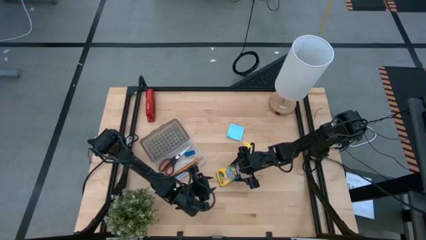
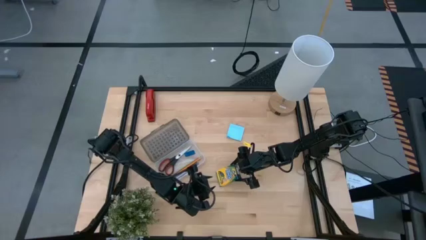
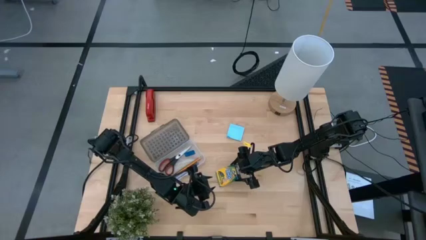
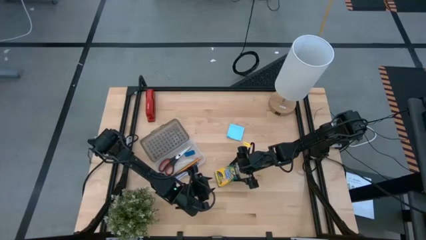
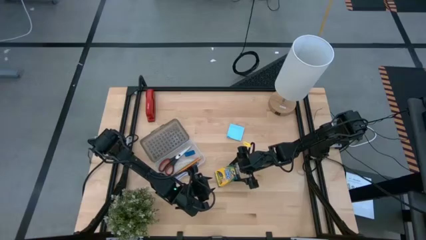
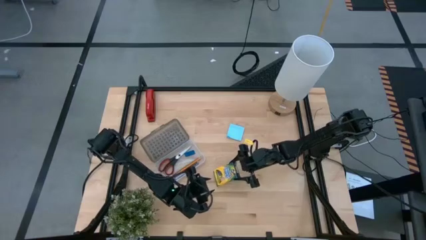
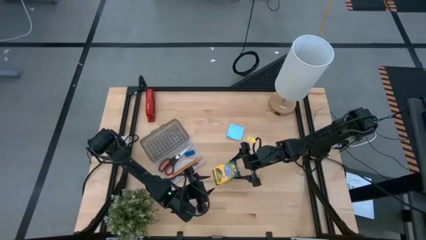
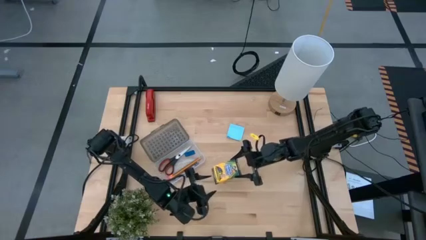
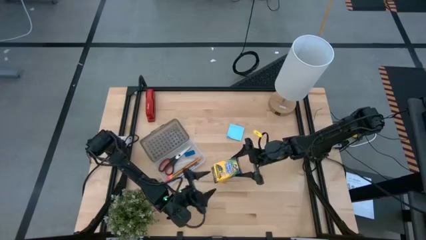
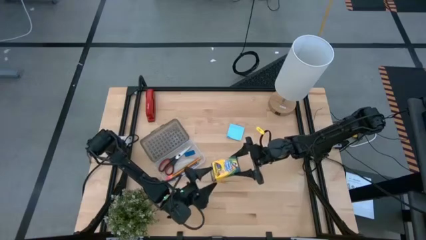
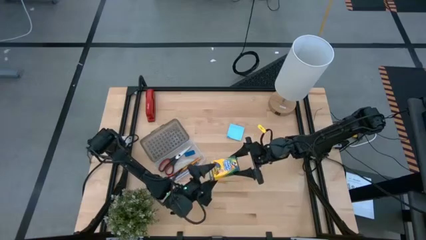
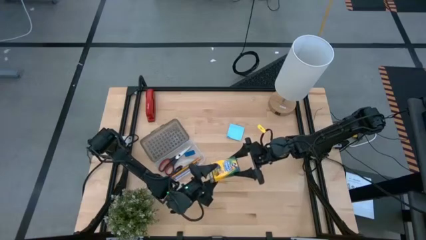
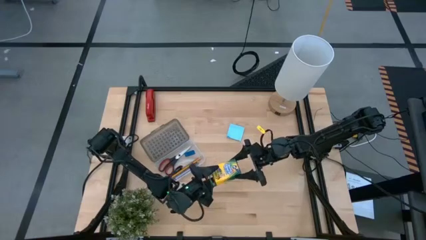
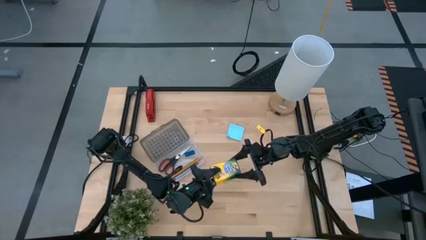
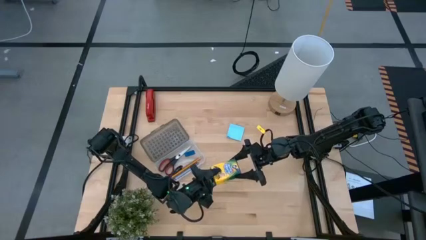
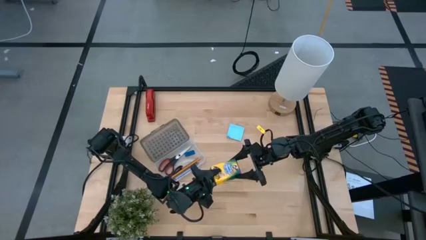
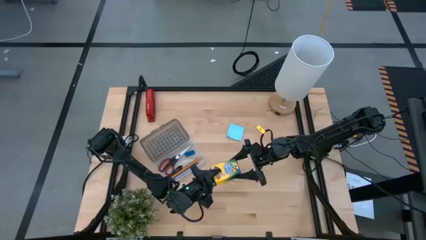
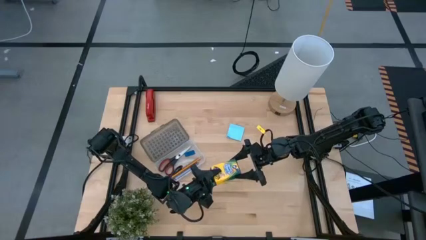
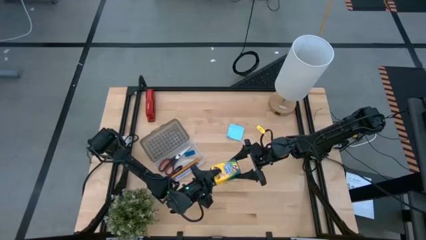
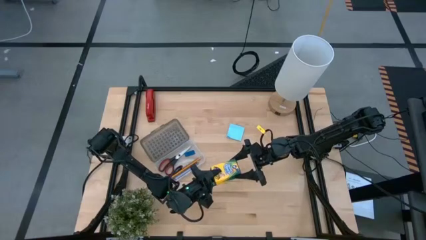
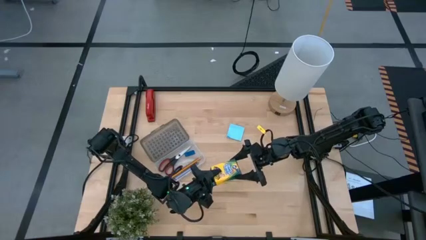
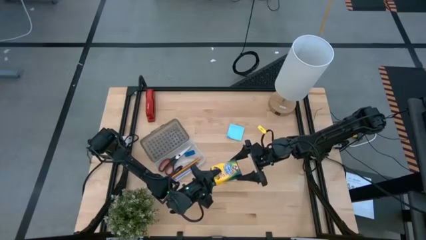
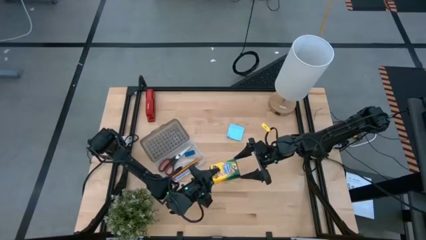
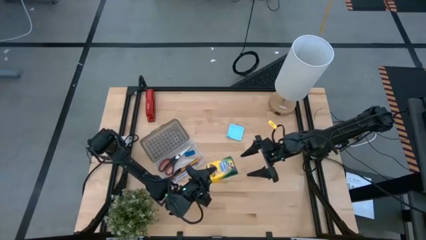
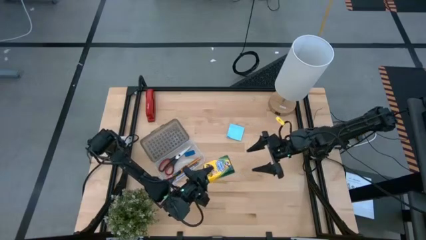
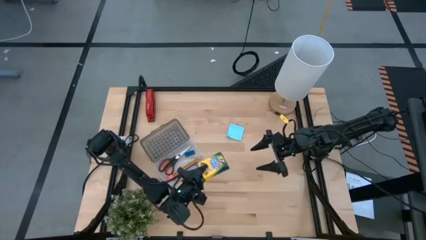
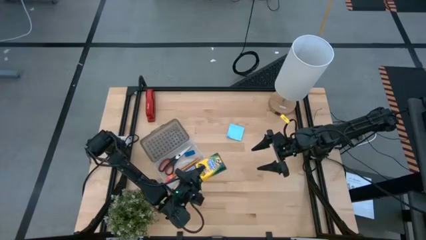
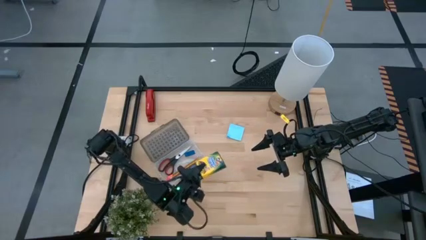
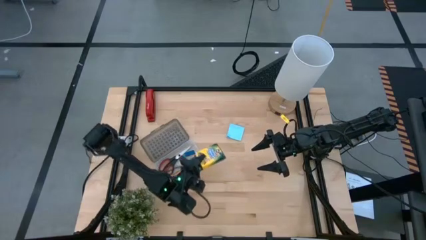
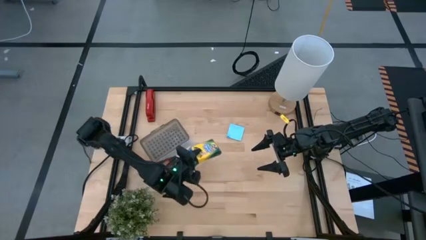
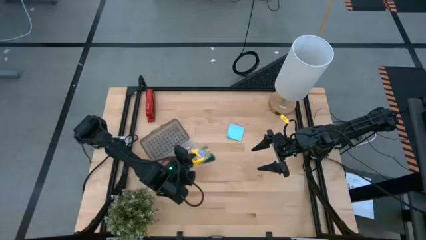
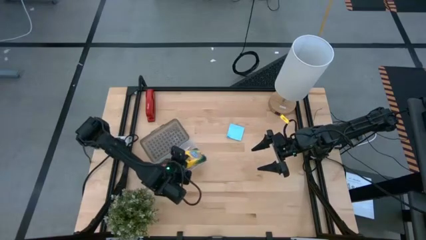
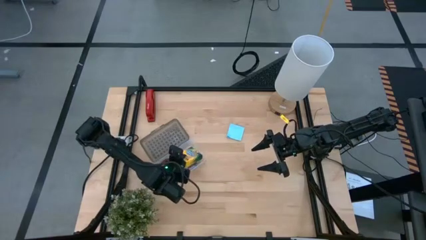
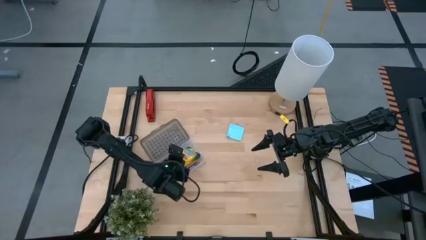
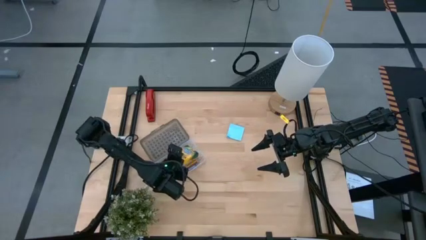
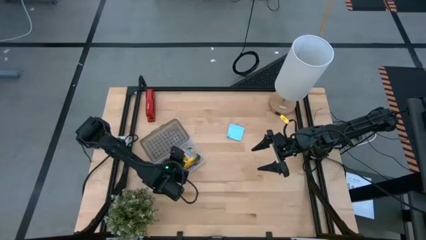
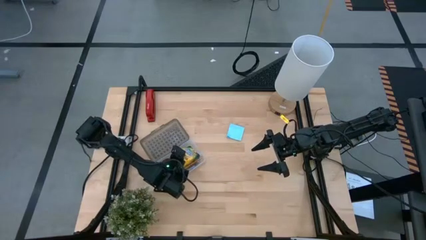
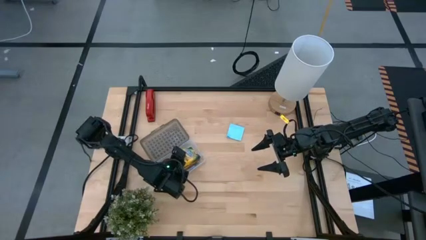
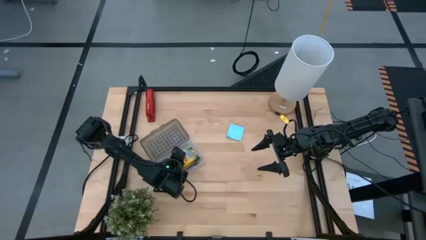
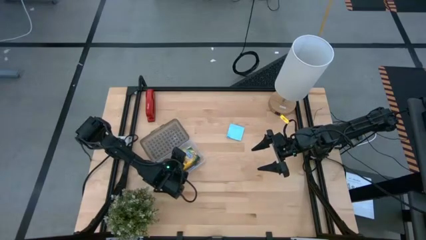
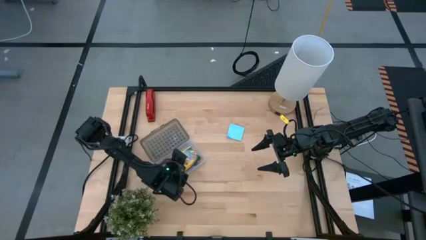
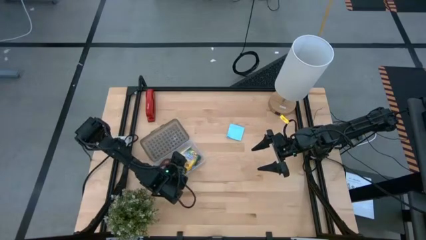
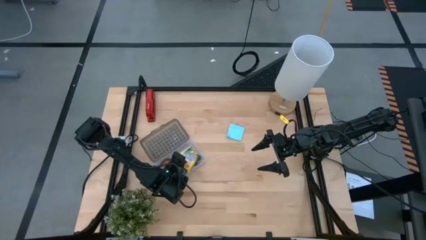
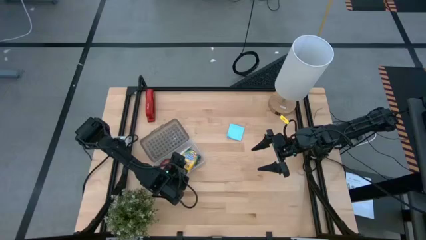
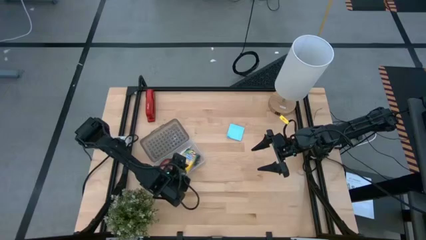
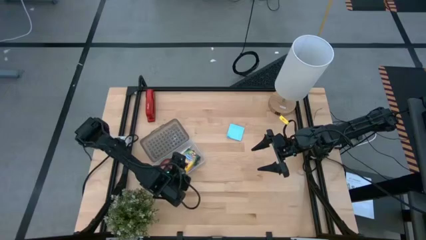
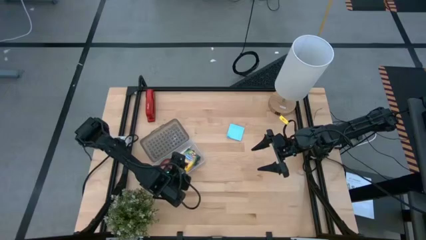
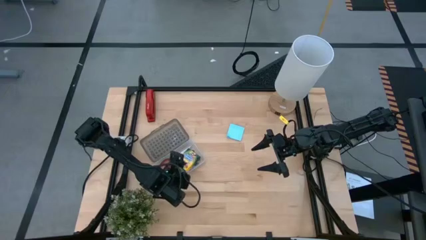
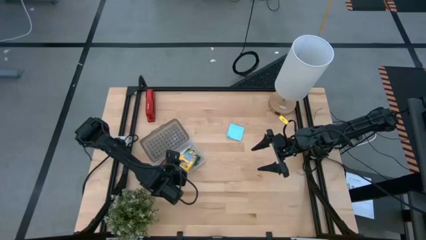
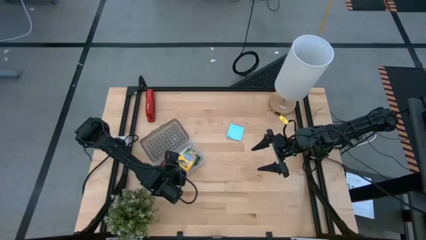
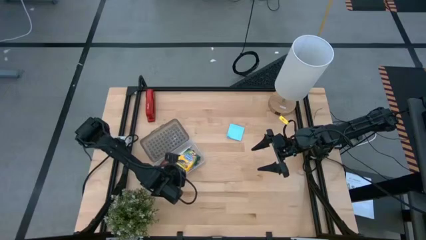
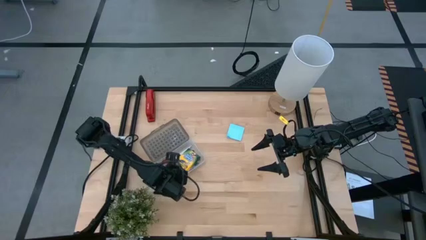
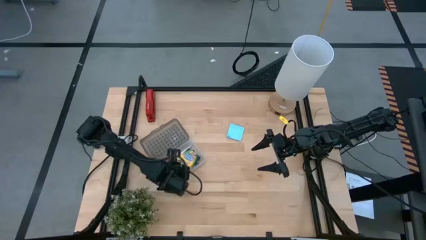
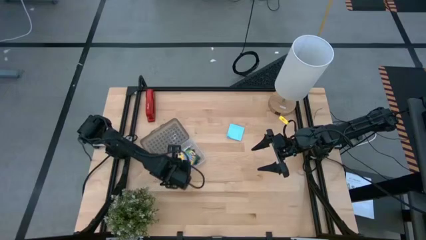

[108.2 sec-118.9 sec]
Task: Pack school essentials
Put the yellow crayon box into the supply box

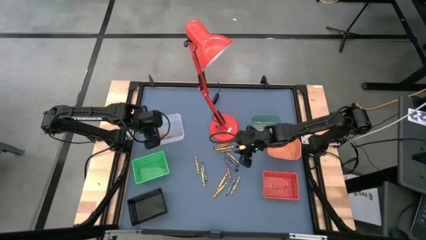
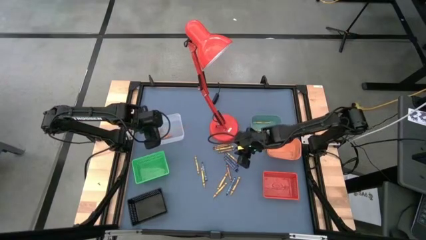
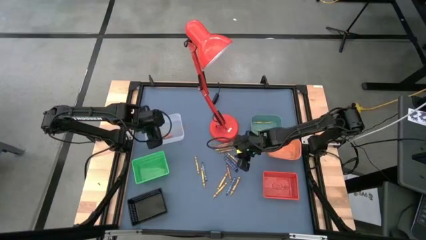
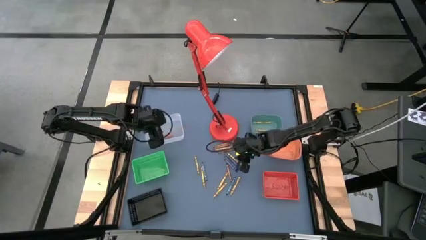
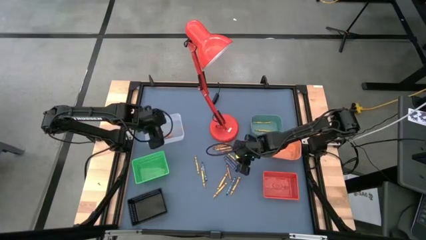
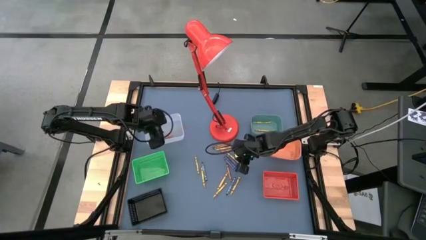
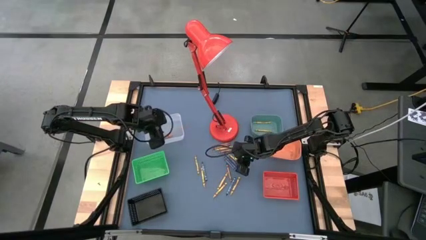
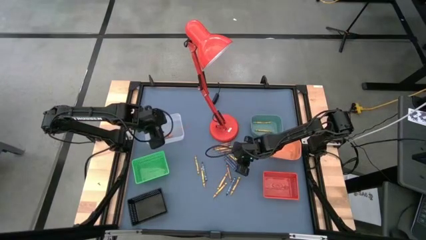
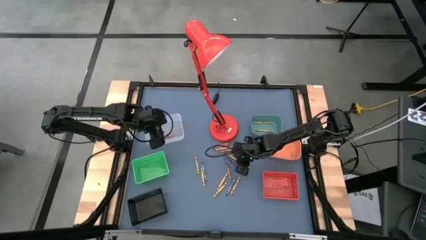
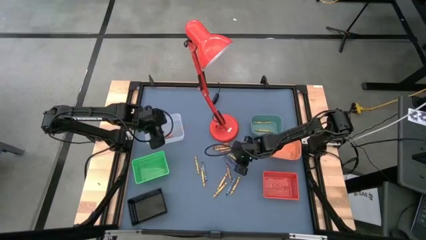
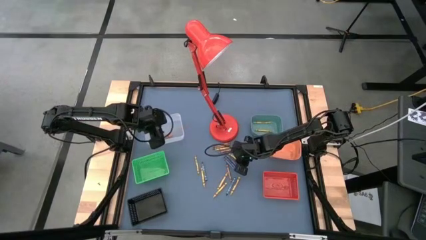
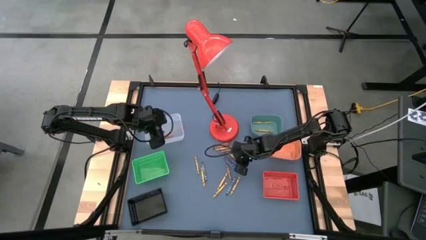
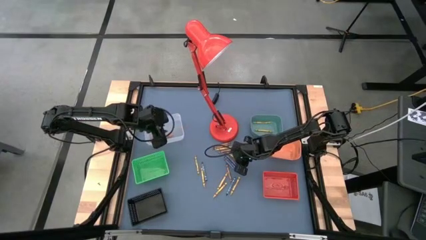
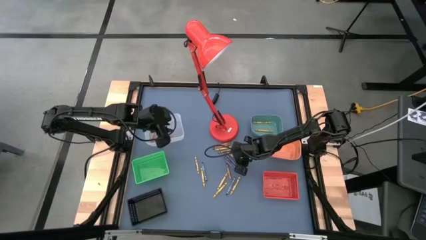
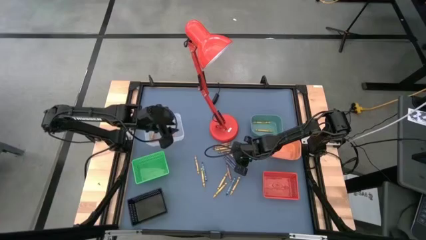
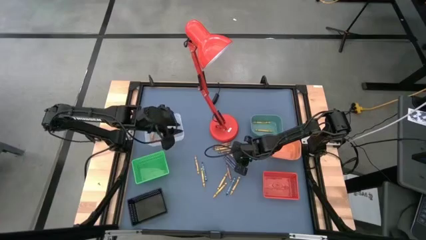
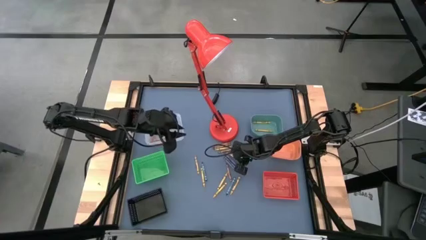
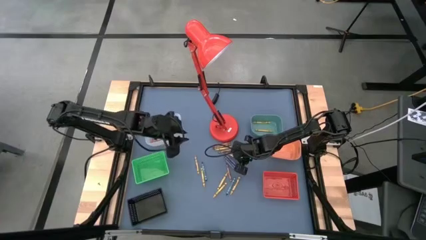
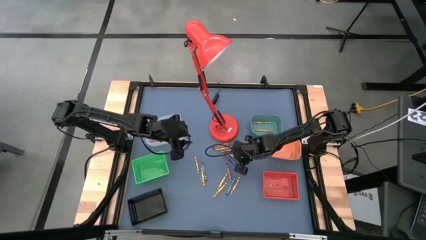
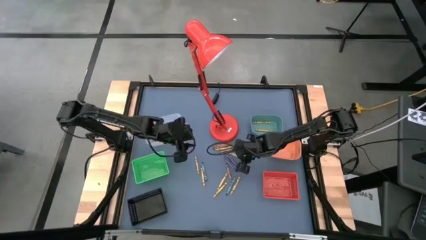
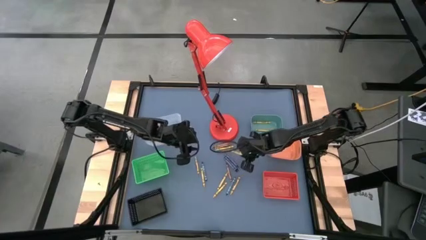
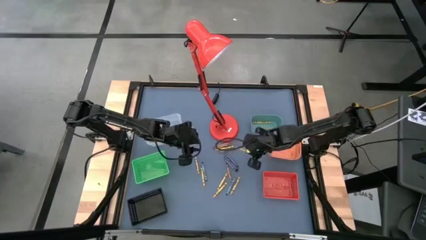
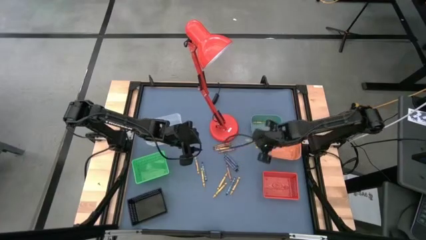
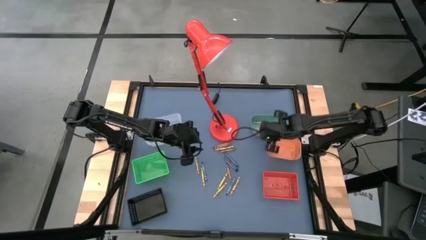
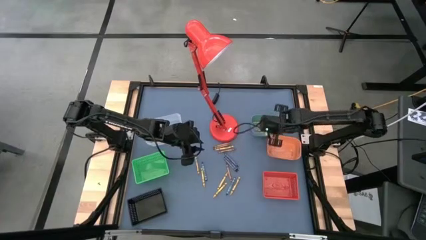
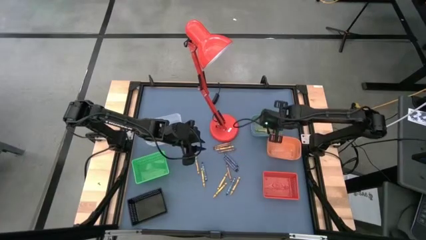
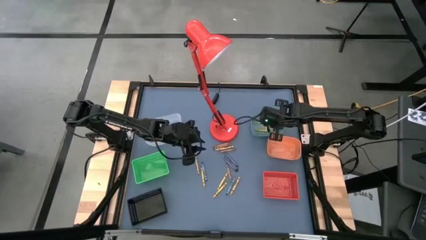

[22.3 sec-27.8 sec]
Task: Sort crayons
Put the yellow crayon into the blue bin
